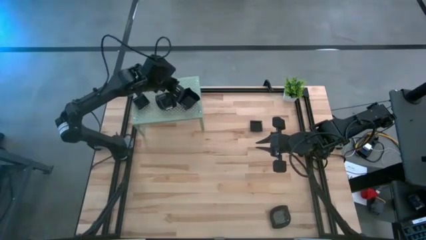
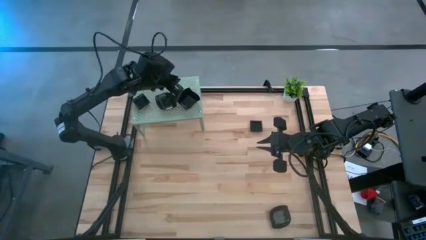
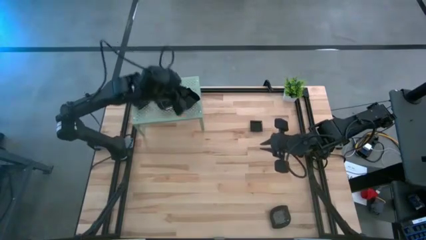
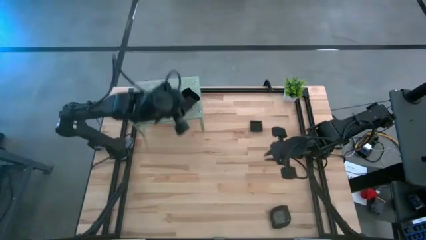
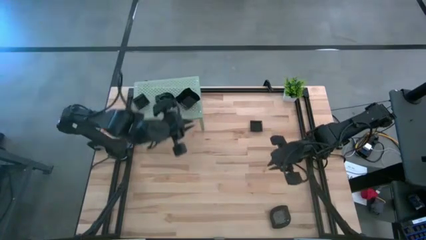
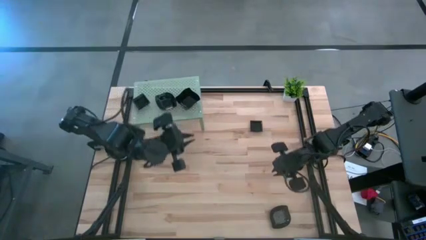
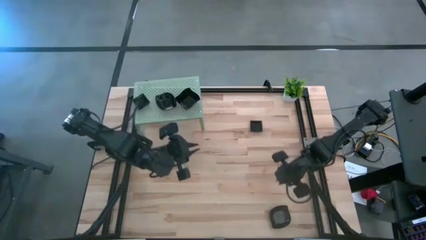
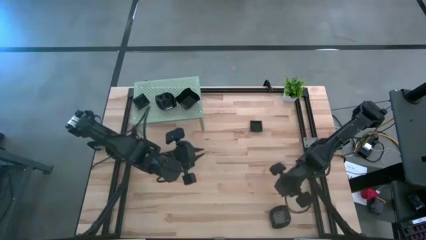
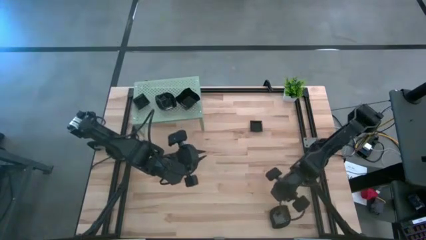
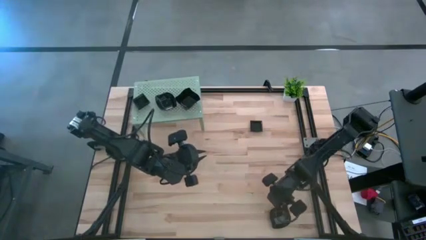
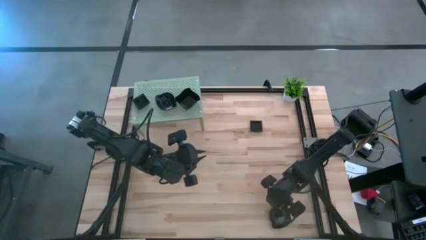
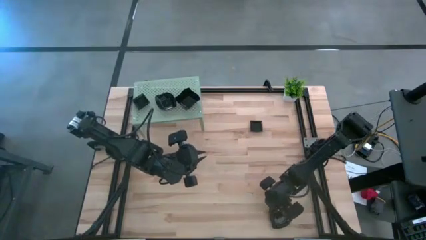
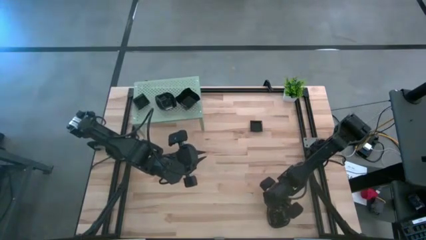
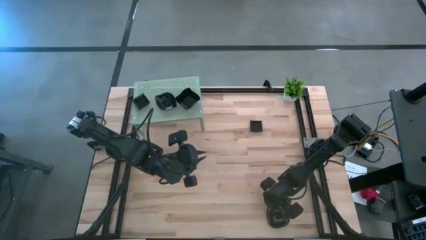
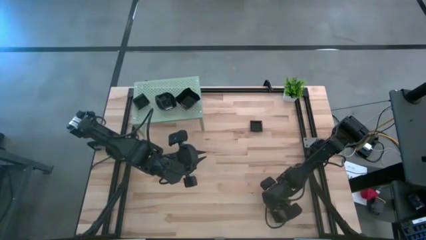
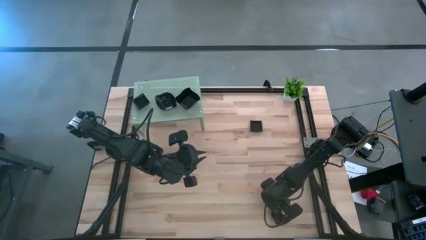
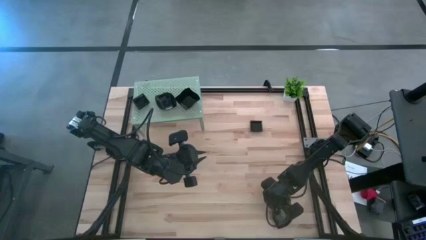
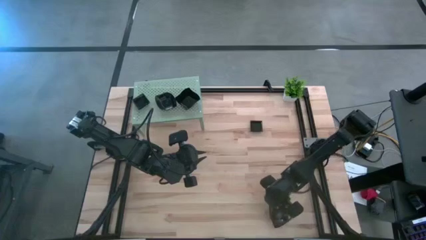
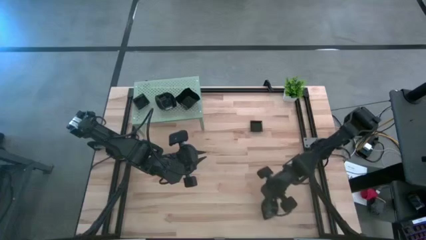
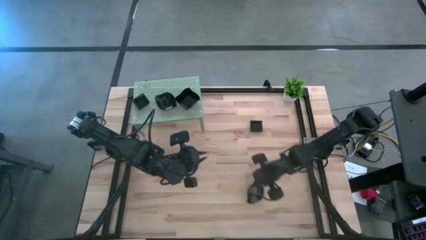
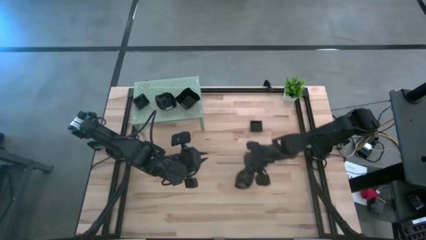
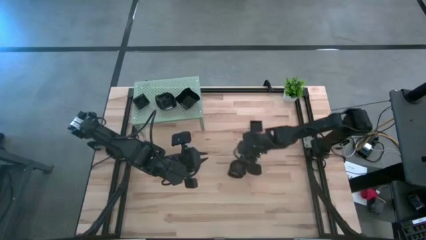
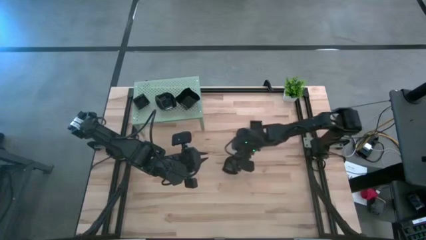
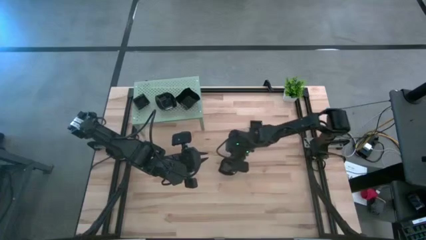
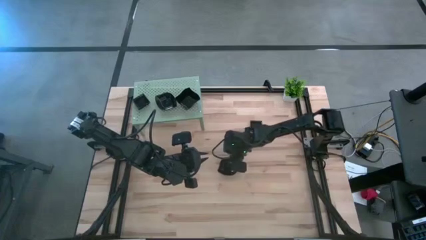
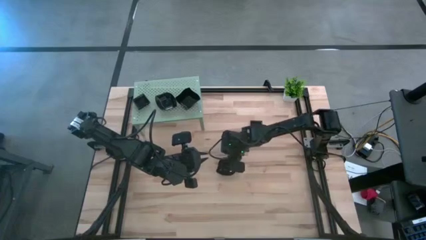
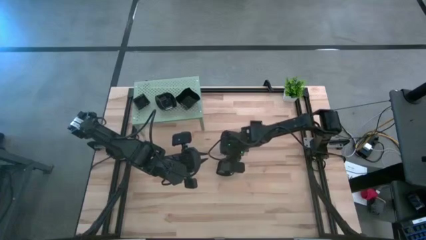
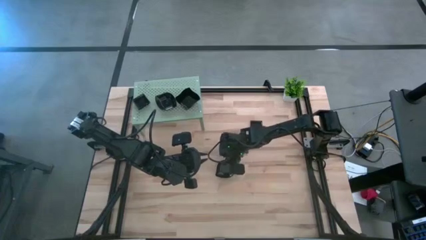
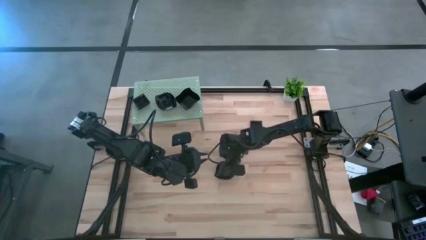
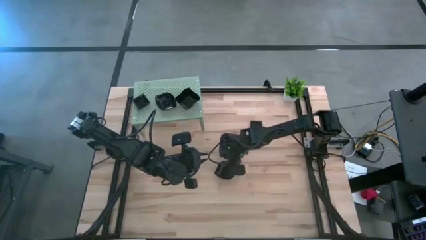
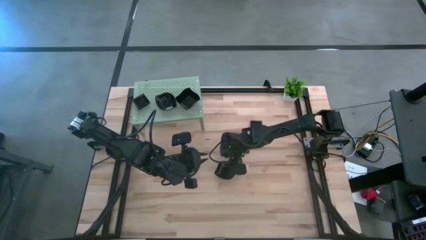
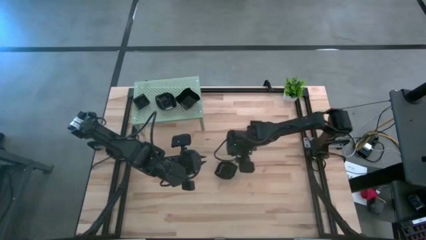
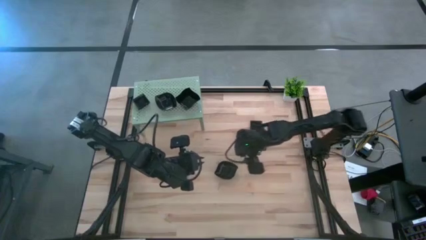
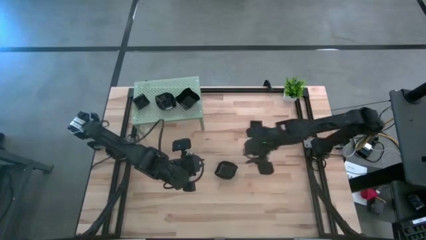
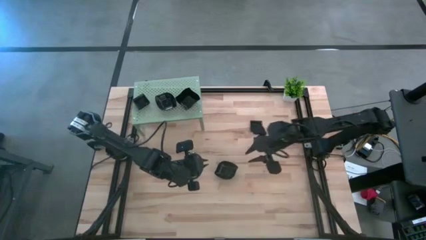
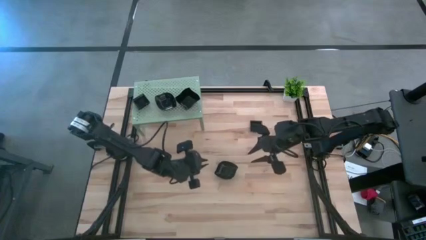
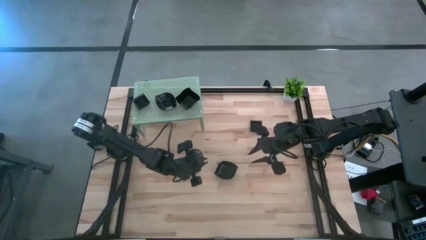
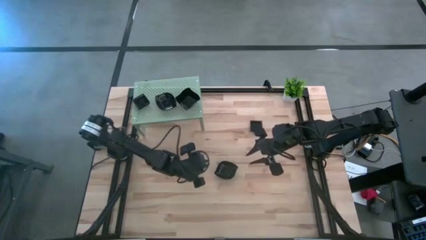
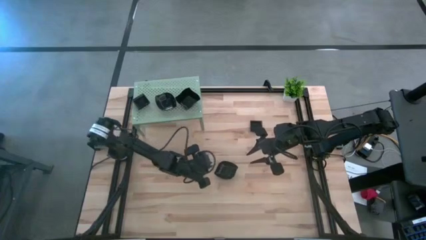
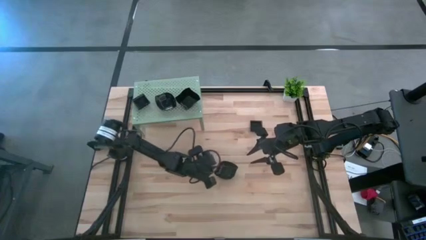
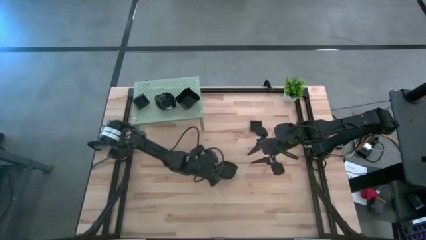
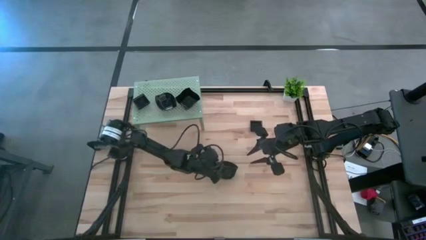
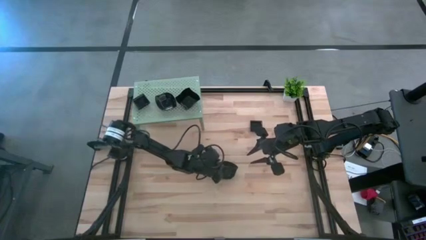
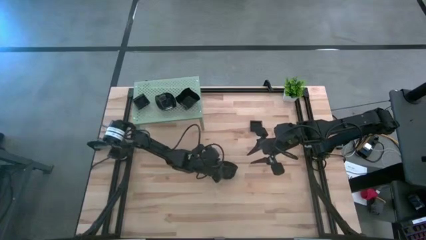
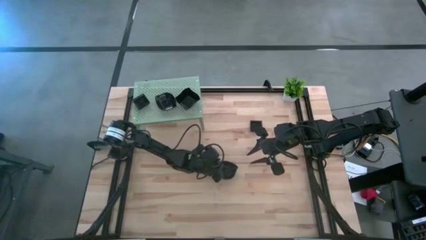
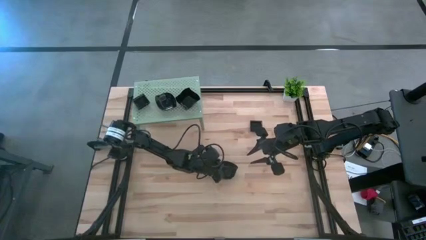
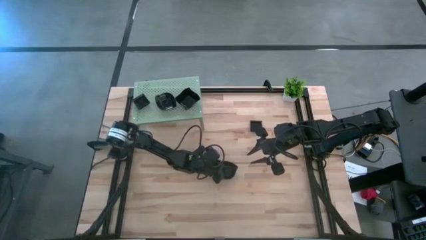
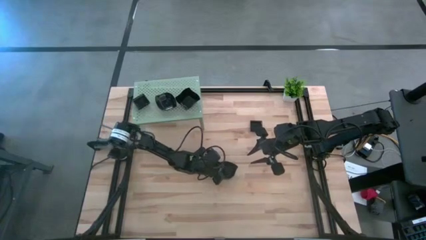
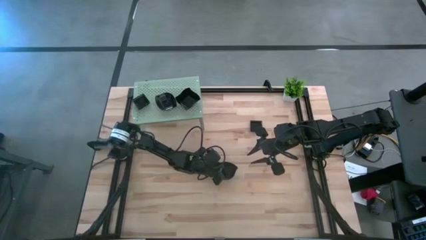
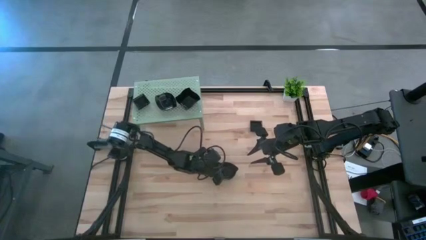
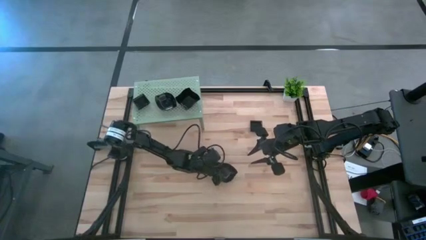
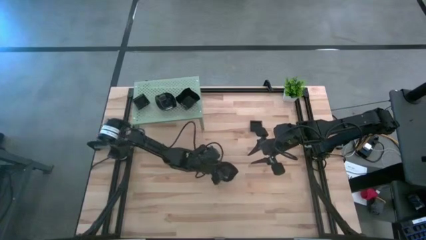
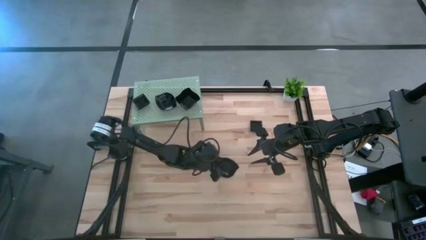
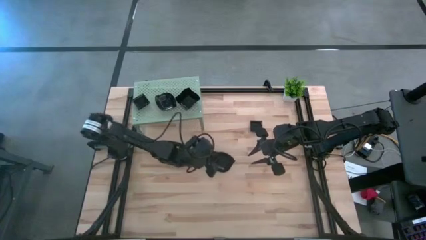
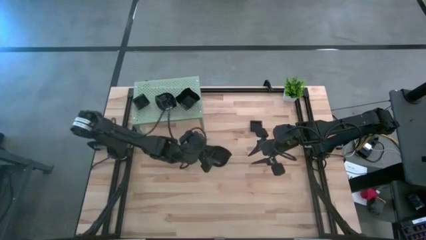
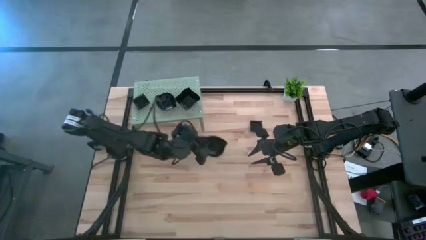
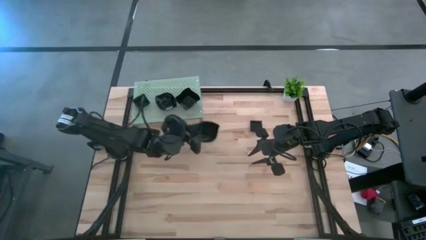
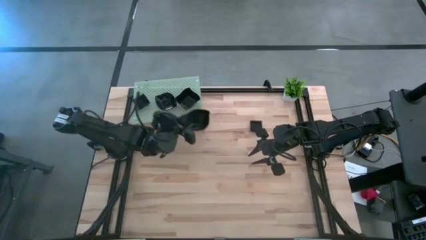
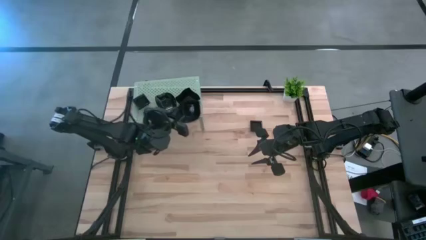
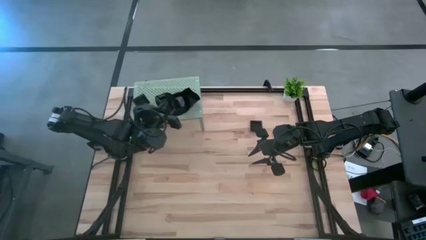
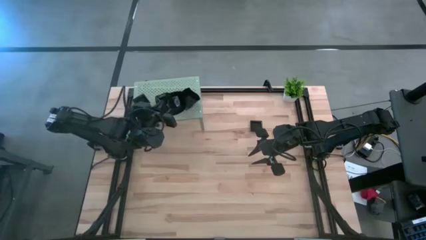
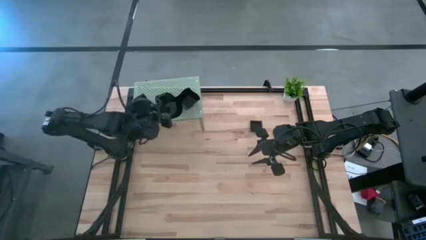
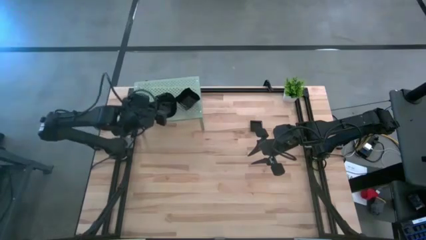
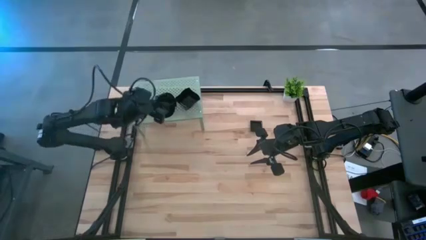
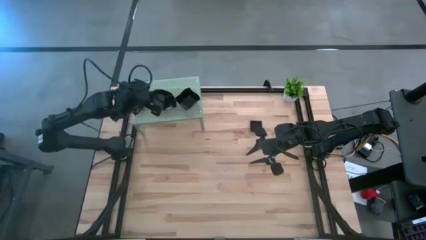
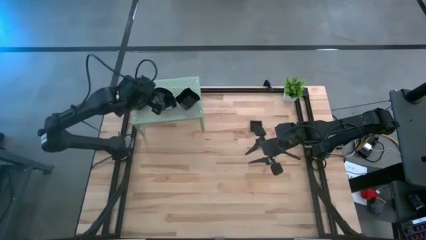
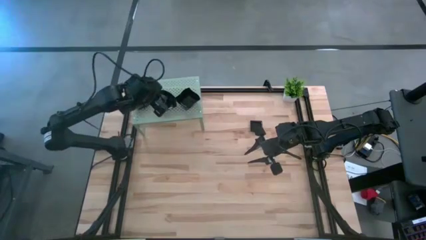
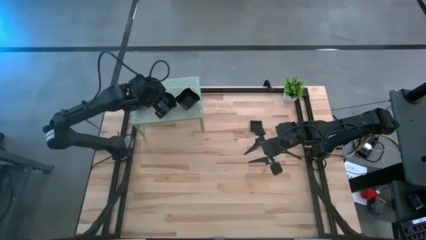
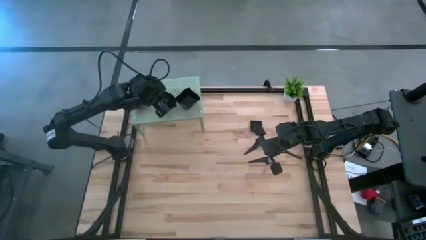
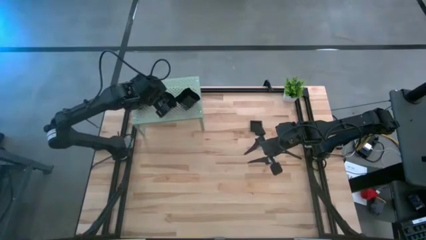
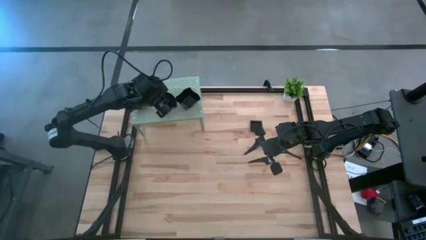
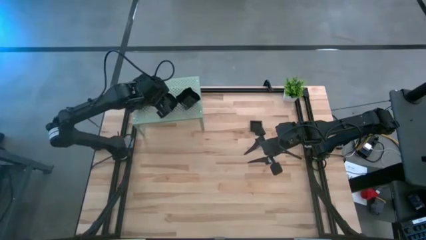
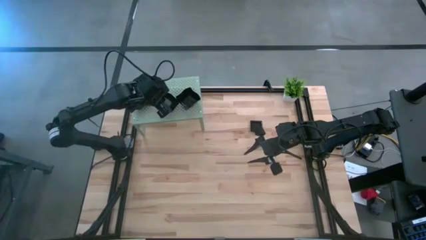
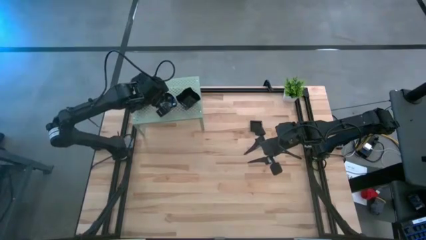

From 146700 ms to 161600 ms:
Task: Pick & Place Mini shaped plates
Stack the black leaf shaped plate on top of the leaf shaped plate on the shelf
